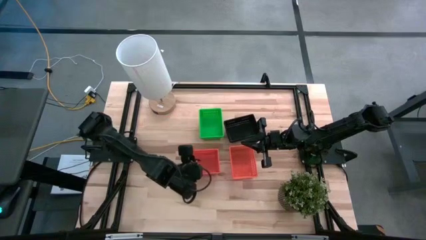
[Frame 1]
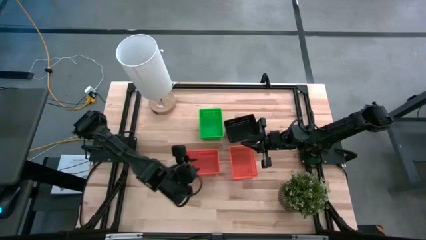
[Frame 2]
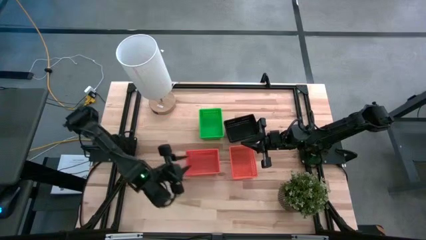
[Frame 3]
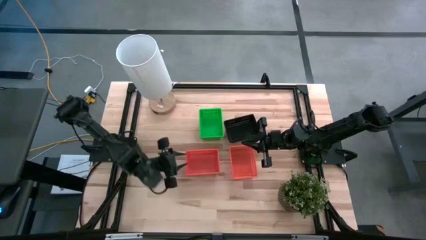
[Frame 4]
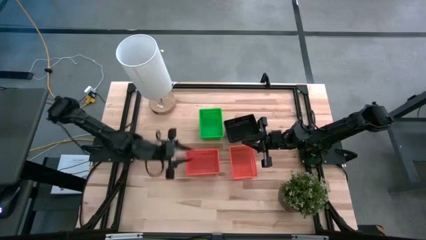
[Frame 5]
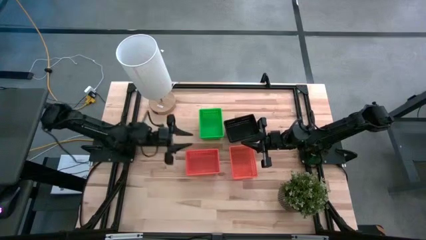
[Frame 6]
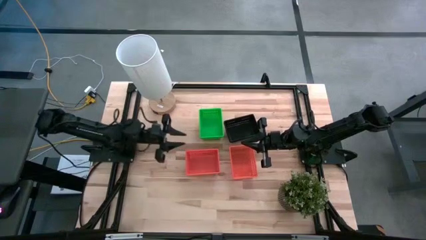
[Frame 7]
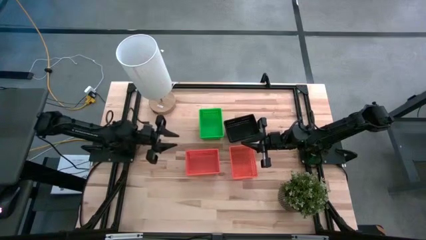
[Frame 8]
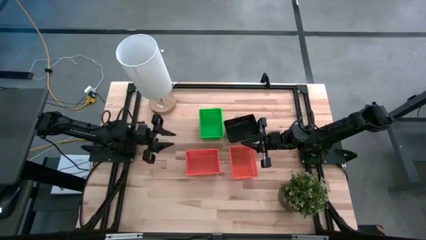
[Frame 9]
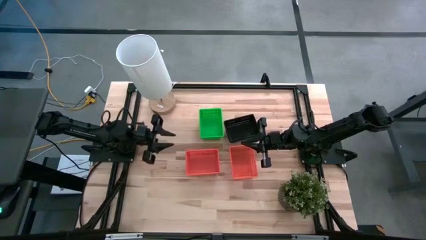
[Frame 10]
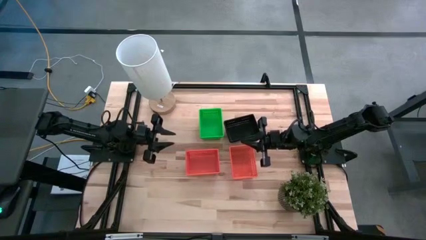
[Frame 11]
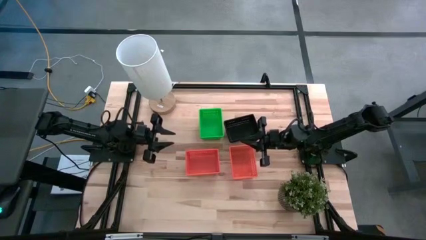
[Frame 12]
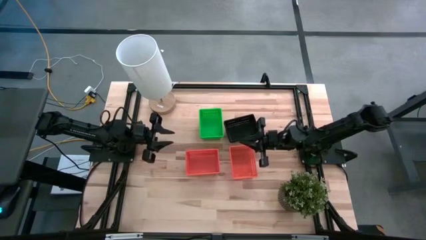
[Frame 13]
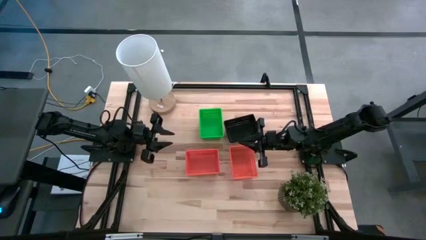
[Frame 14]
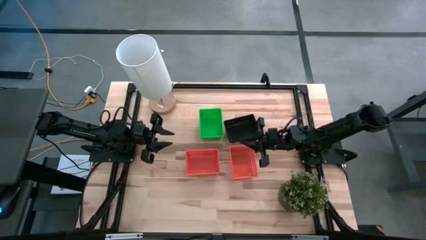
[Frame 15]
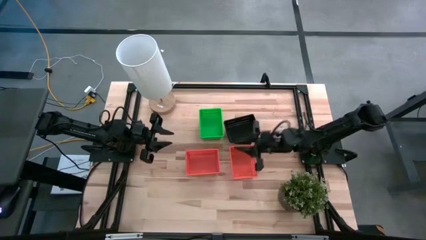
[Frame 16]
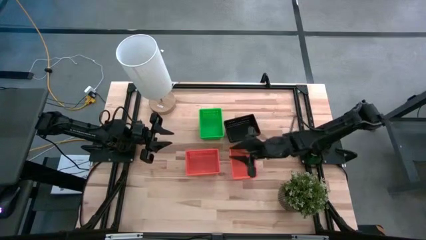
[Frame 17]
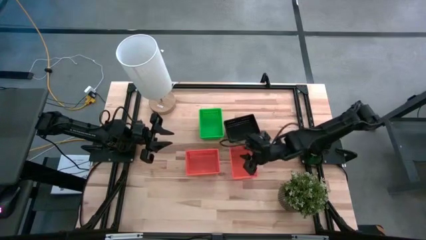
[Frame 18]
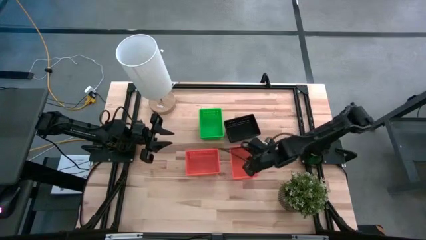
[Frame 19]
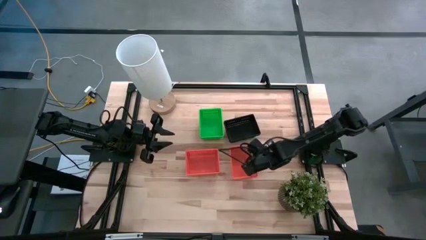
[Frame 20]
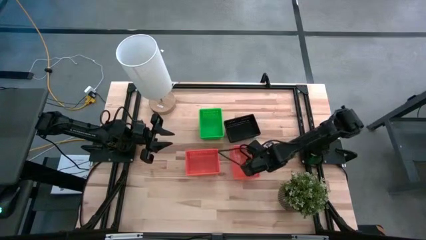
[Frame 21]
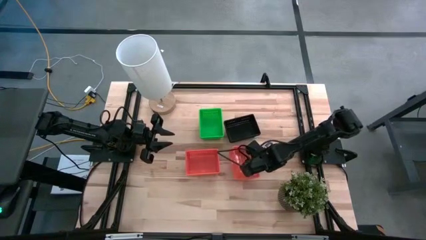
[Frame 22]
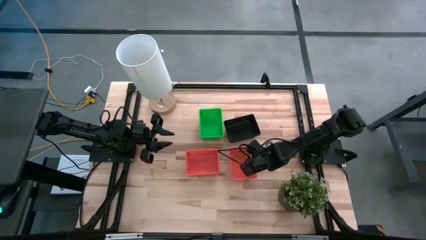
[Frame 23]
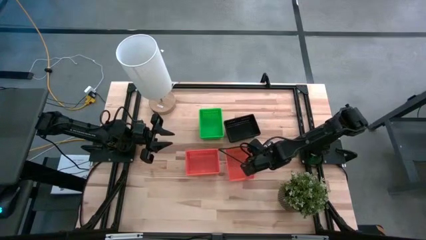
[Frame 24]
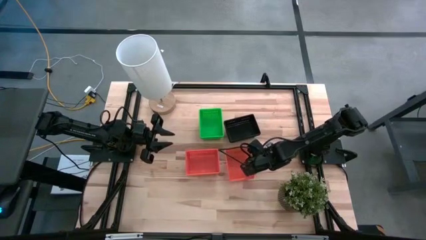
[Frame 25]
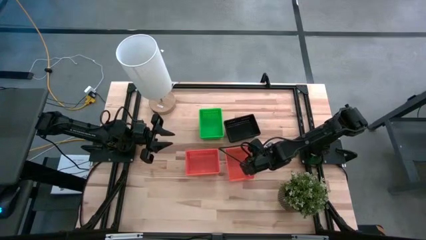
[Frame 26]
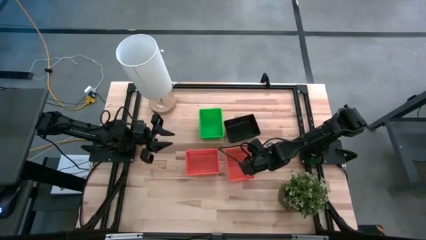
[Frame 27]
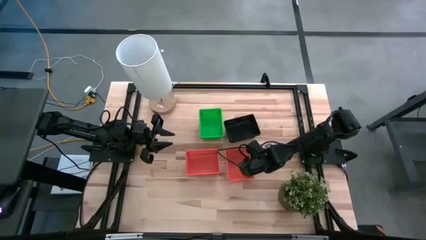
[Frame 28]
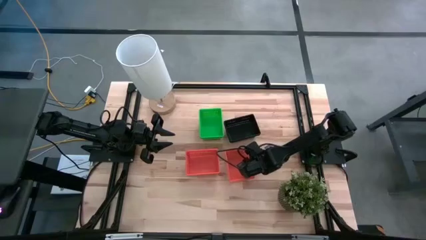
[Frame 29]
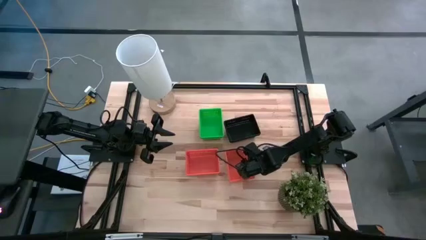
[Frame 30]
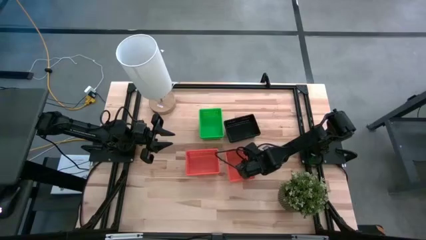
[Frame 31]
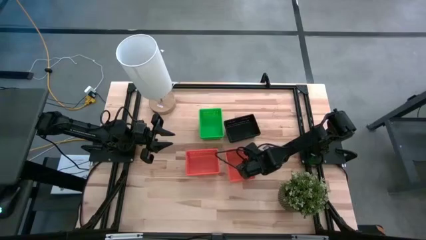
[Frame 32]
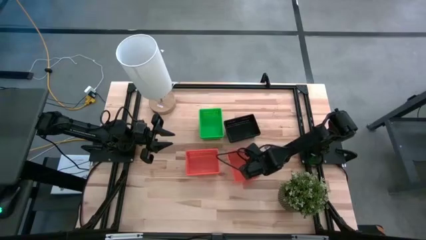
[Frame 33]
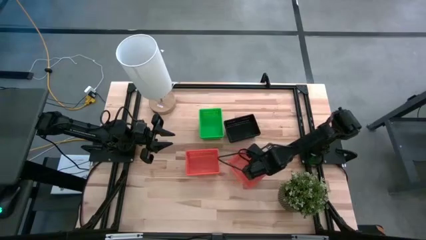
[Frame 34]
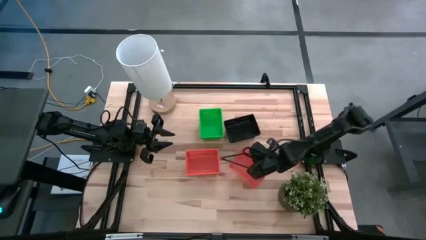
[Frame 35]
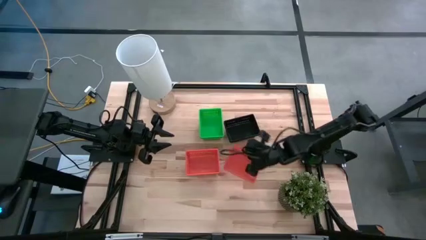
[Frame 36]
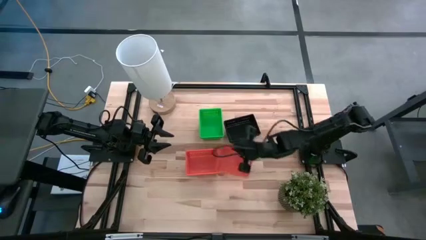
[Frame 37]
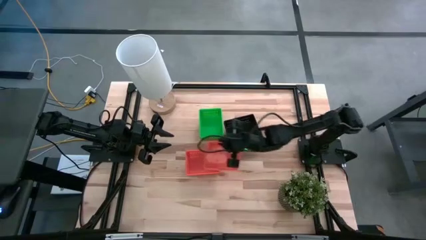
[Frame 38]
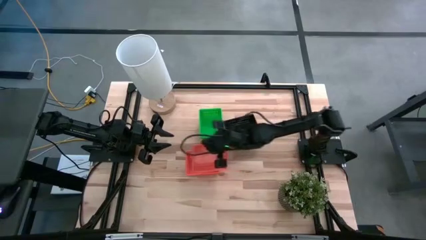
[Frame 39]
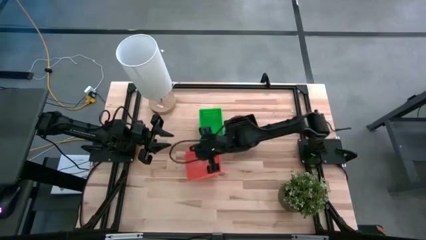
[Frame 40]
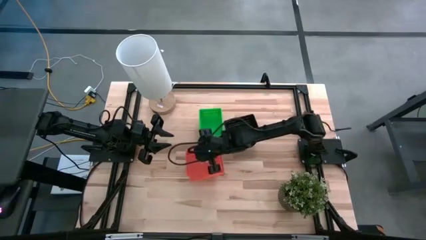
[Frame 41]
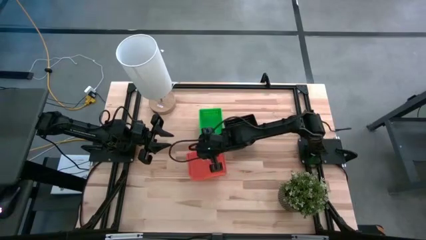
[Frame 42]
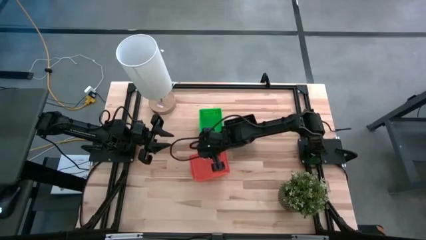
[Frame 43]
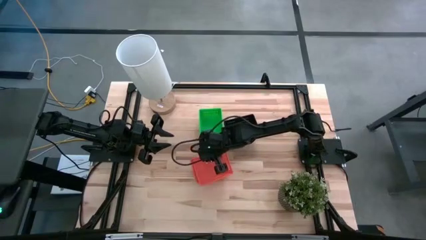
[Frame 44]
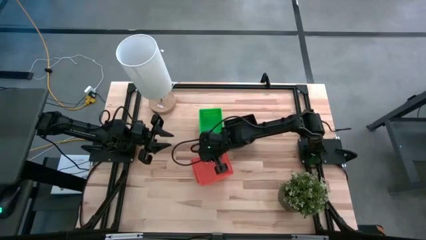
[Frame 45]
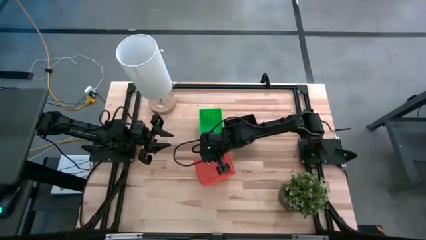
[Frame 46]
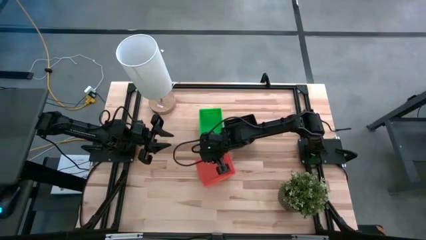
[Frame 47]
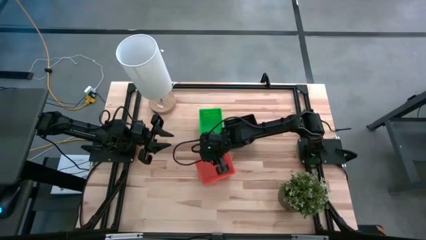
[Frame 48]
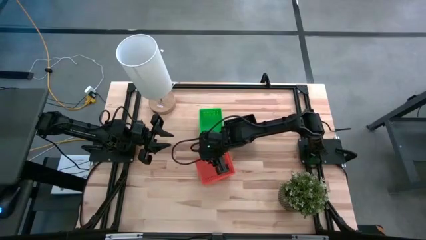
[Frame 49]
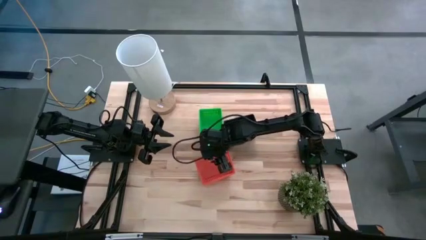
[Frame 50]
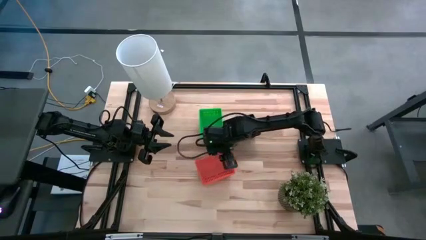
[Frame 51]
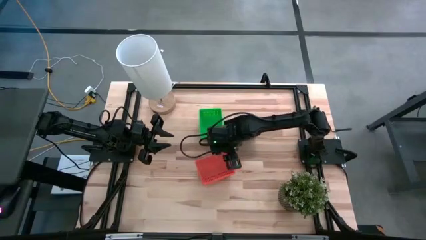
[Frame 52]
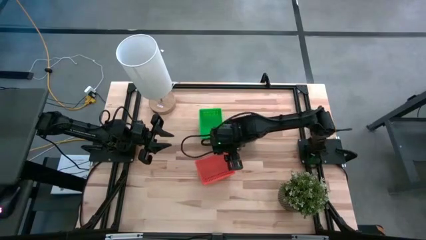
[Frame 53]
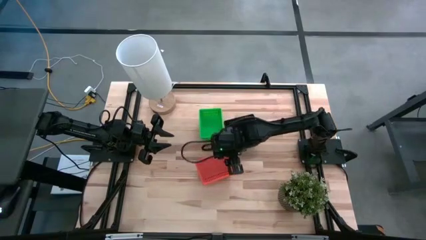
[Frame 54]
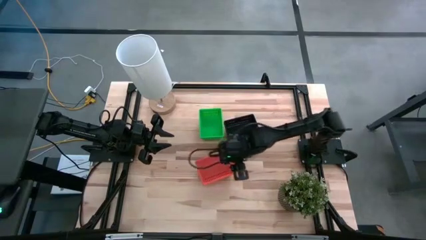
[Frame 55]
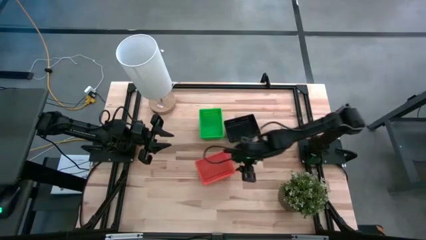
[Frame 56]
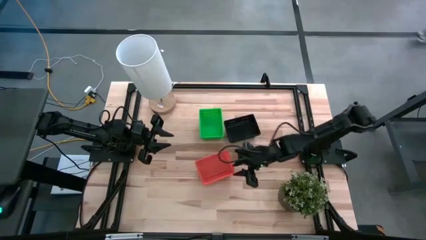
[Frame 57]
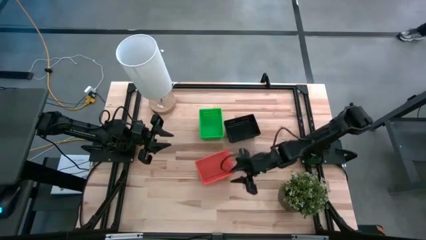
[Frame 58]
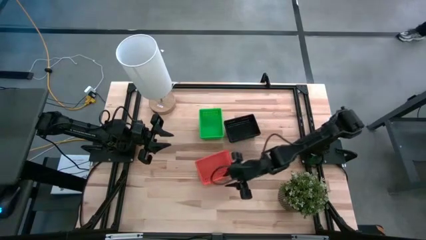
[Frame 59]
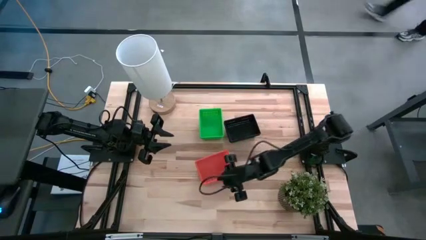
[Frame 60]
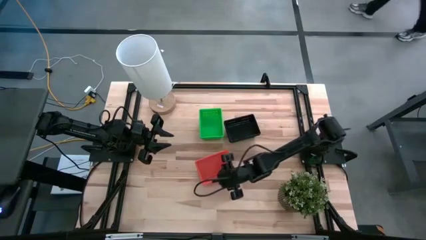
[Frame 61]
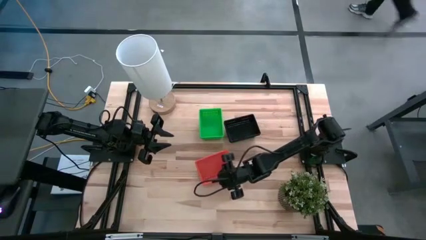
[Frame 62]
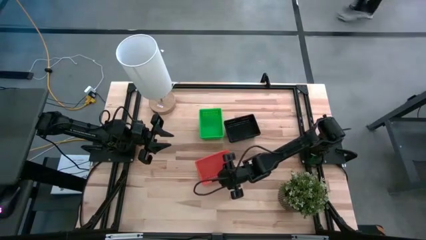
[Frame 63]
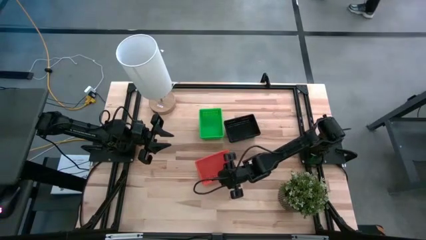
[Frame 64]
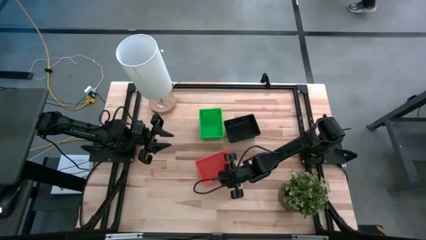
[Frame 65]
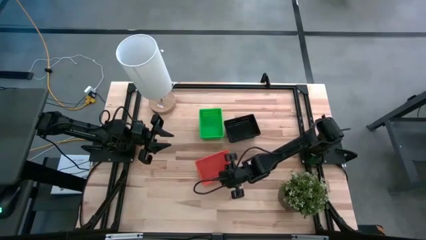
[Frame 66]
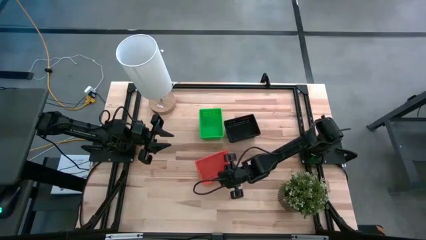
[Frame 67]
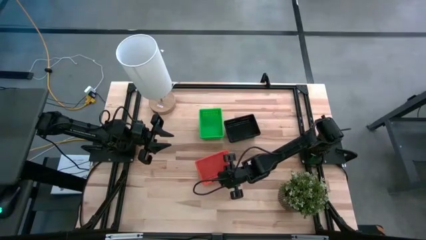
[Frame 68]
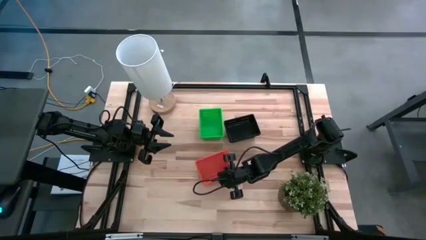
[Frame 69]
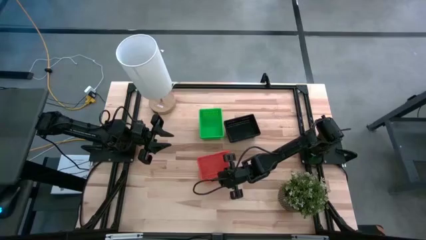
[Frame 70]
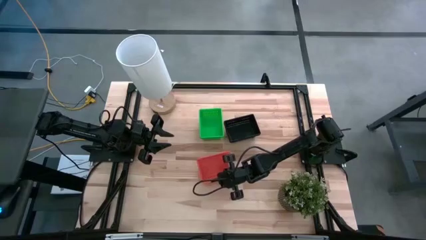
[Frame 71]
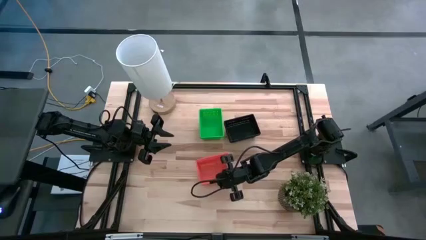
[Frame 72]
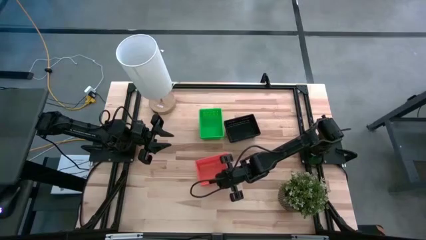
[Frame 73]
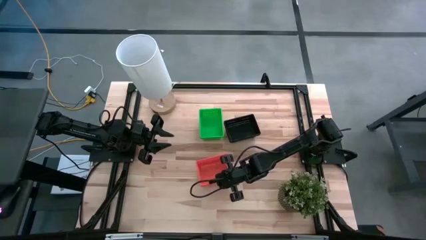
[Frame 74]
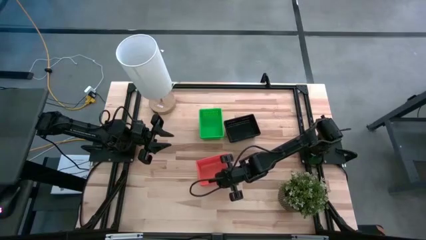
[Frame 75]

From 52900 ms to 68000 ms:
Stack the right orange bin on top of the left orange bin
